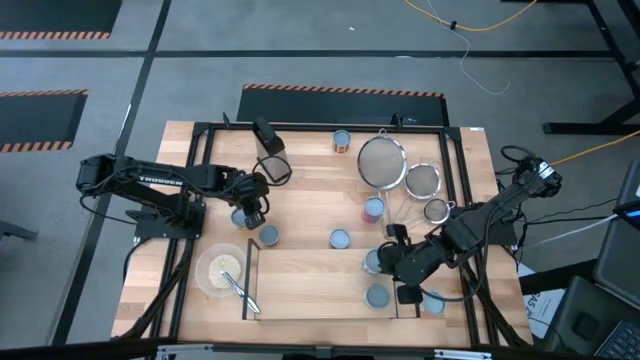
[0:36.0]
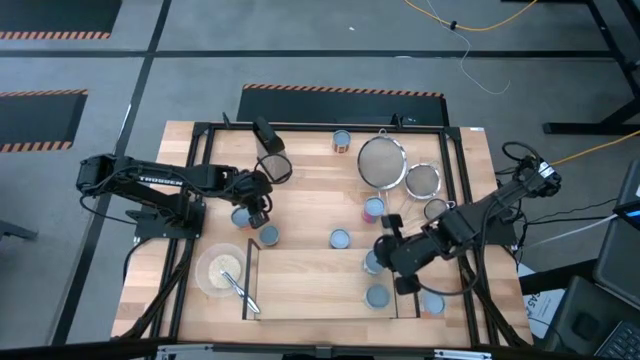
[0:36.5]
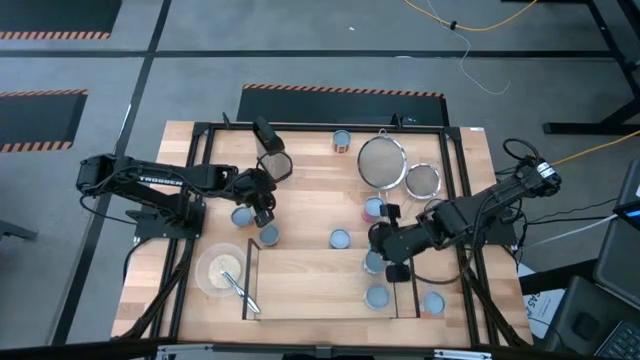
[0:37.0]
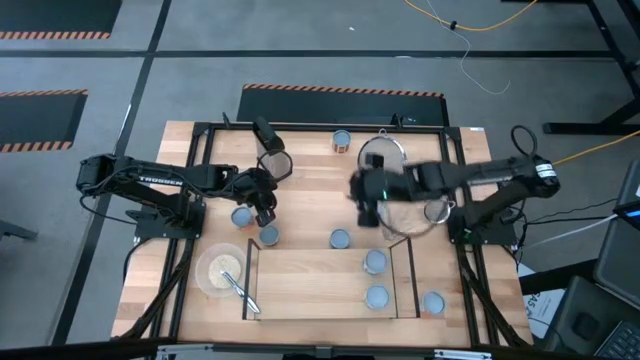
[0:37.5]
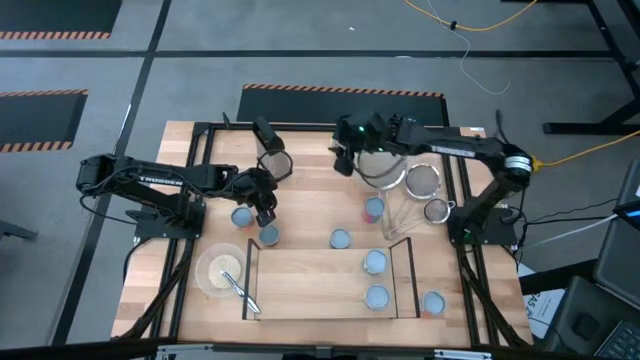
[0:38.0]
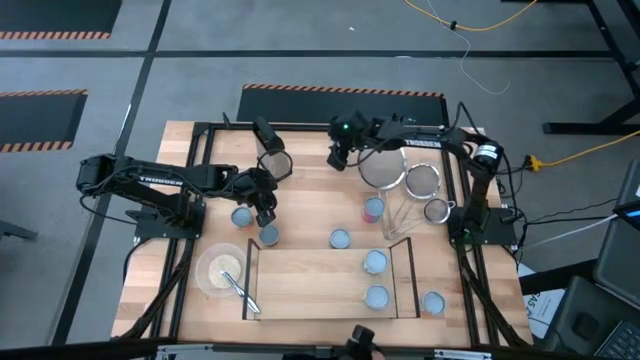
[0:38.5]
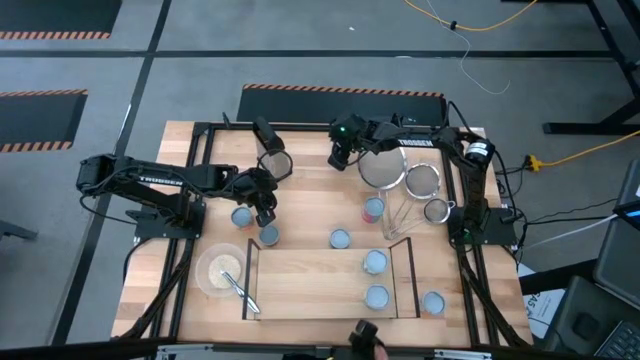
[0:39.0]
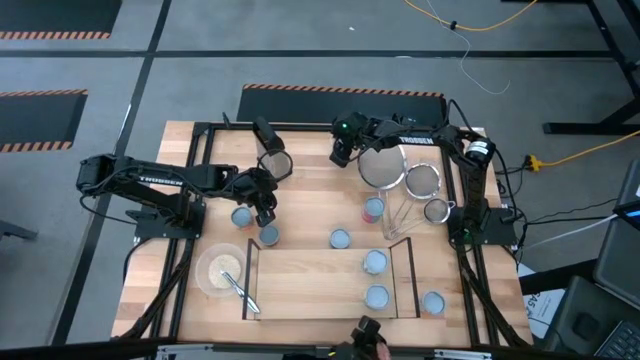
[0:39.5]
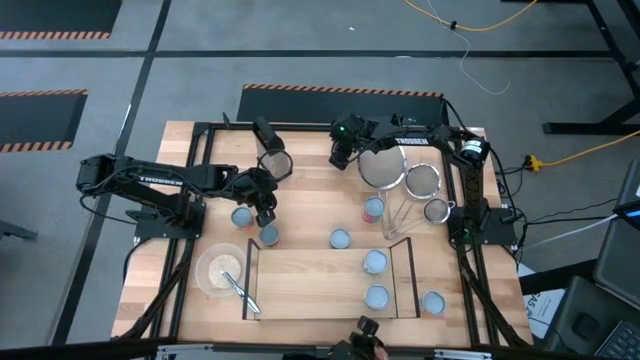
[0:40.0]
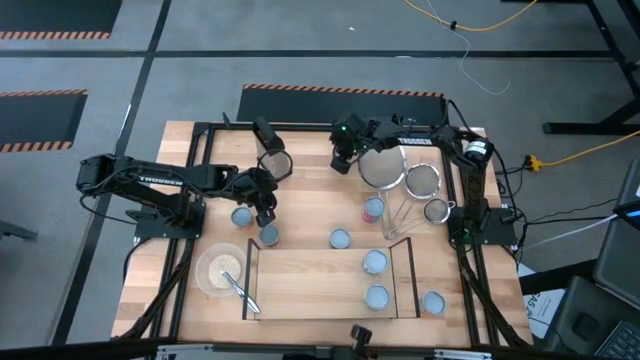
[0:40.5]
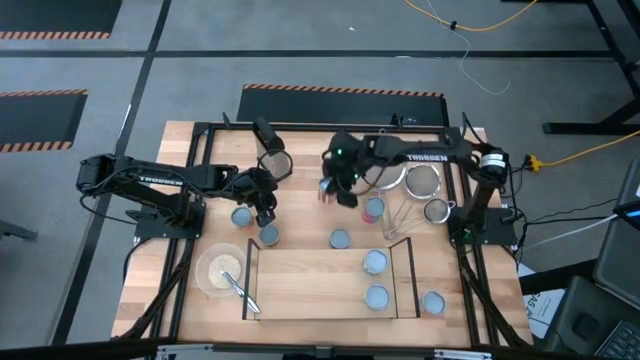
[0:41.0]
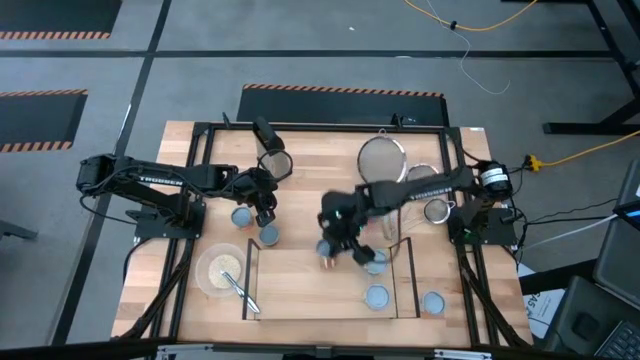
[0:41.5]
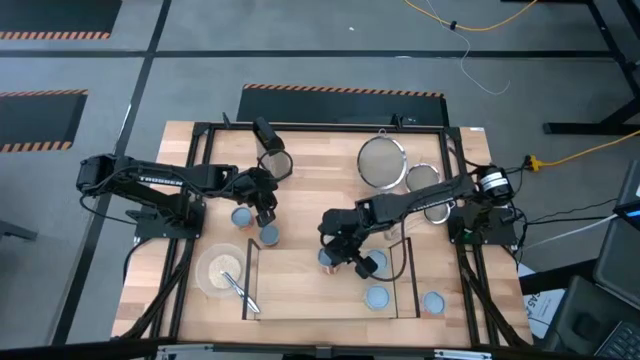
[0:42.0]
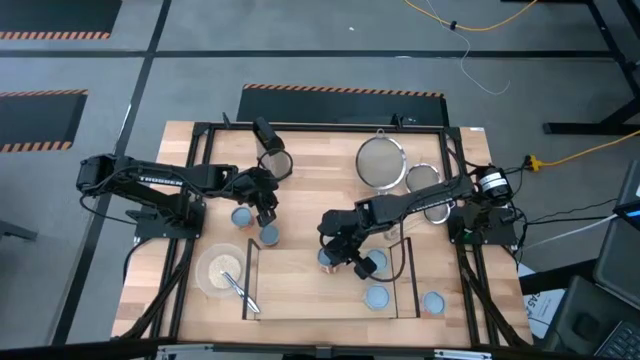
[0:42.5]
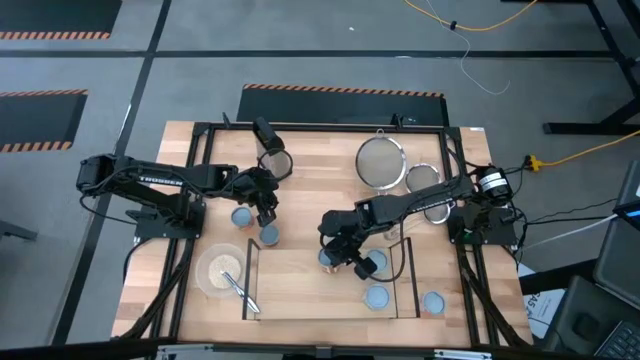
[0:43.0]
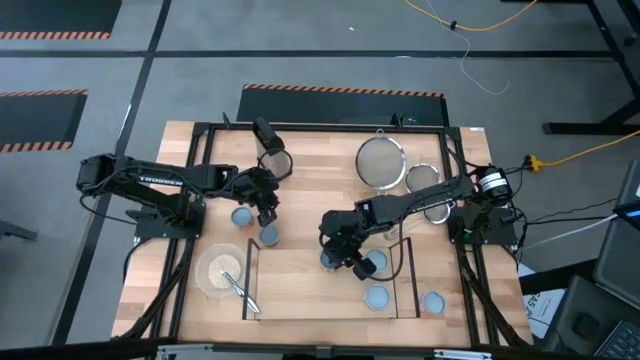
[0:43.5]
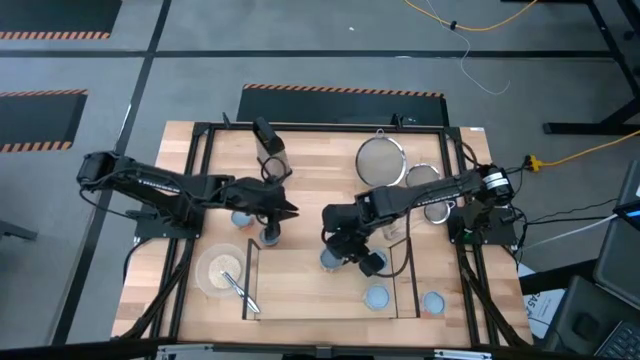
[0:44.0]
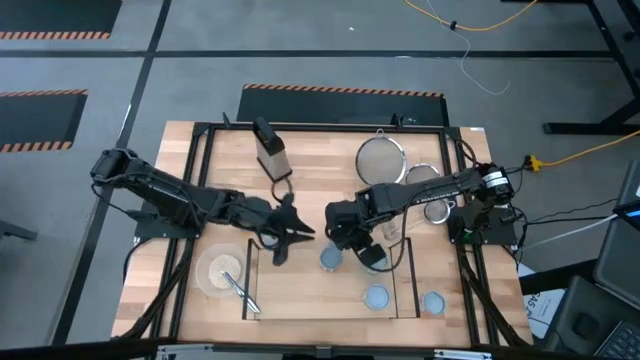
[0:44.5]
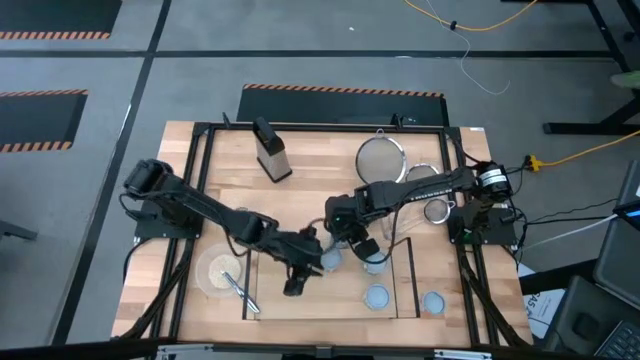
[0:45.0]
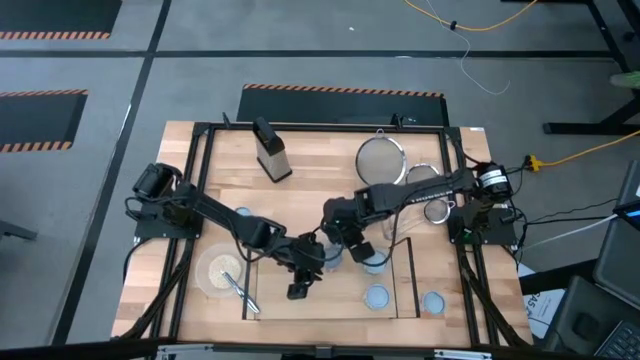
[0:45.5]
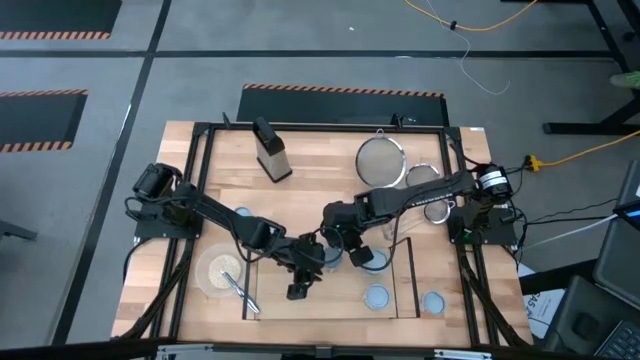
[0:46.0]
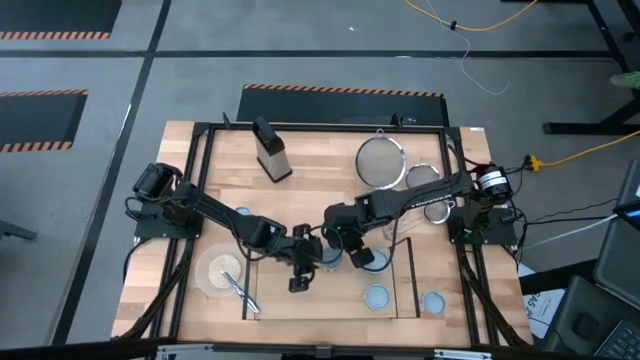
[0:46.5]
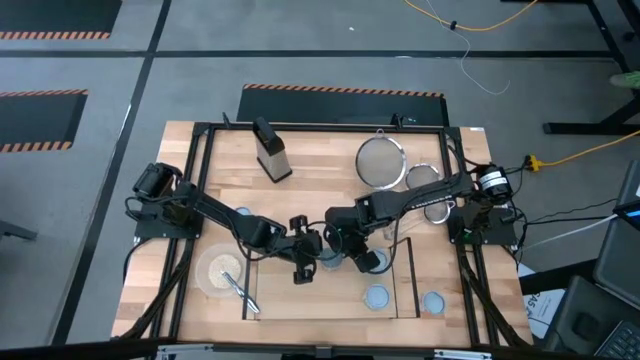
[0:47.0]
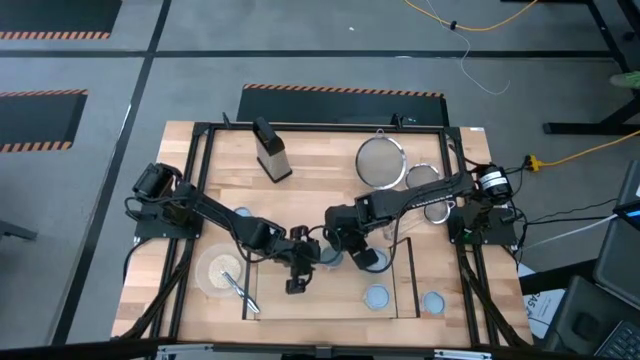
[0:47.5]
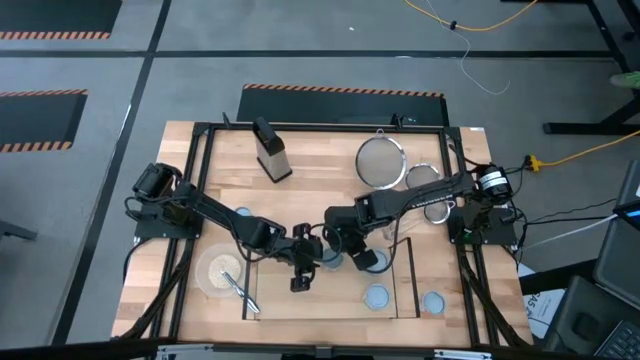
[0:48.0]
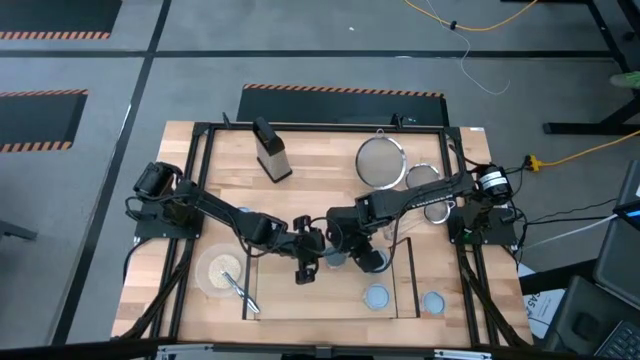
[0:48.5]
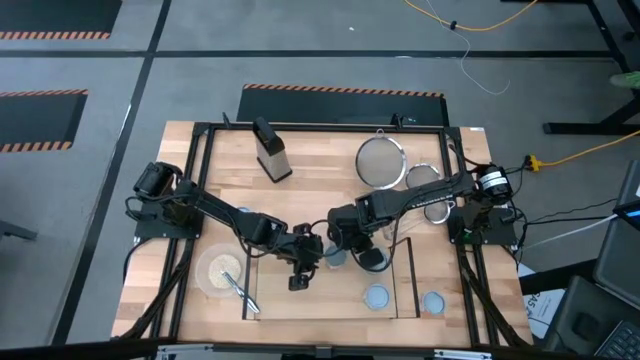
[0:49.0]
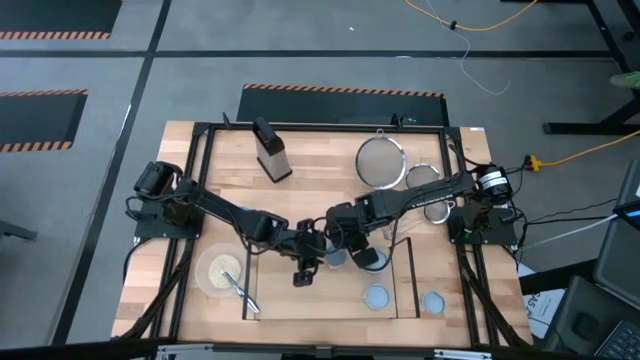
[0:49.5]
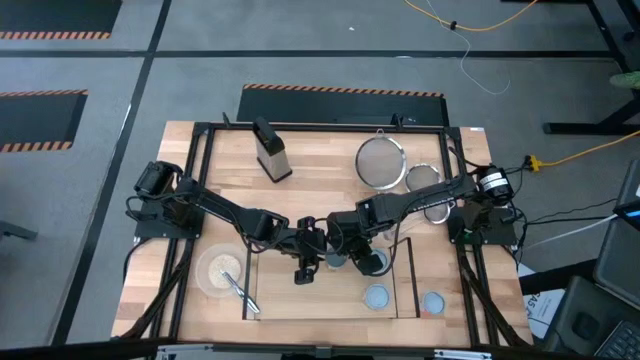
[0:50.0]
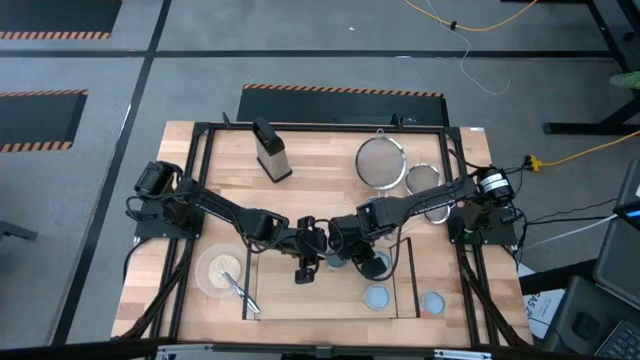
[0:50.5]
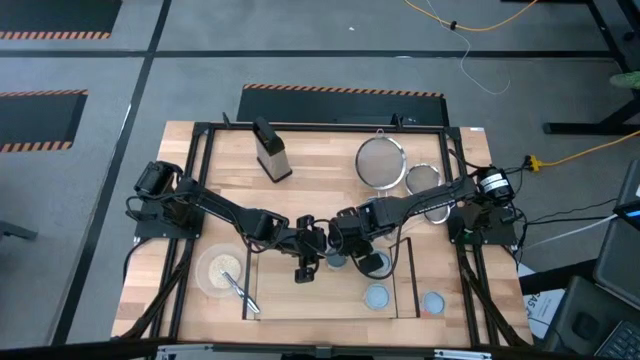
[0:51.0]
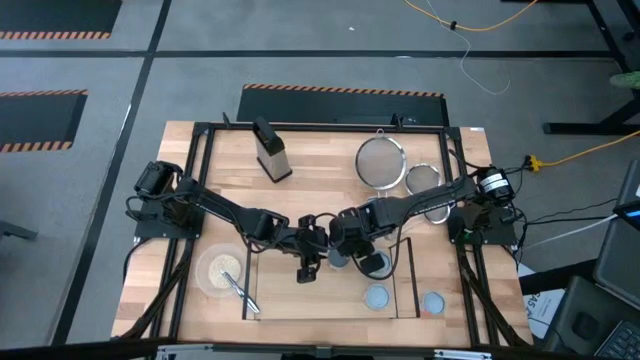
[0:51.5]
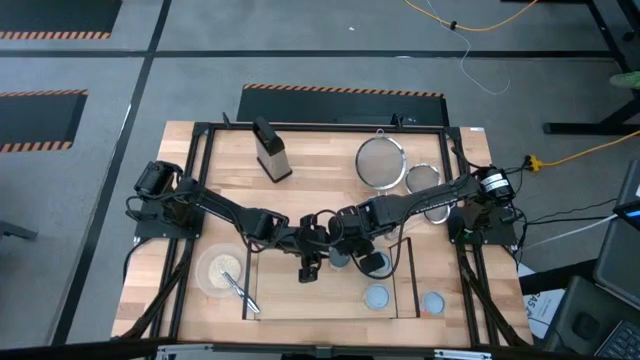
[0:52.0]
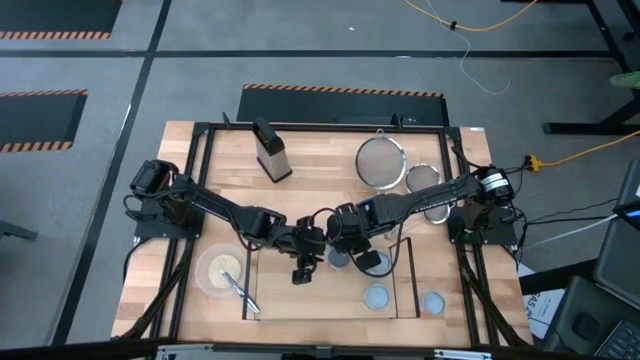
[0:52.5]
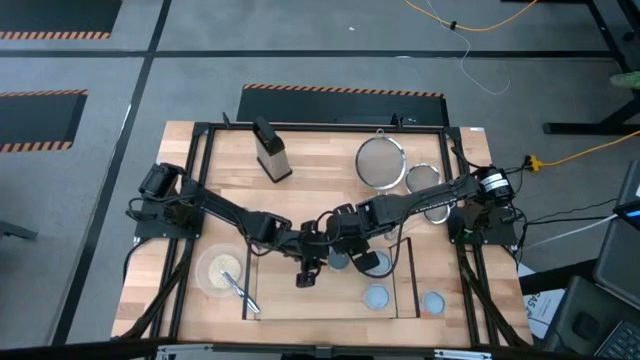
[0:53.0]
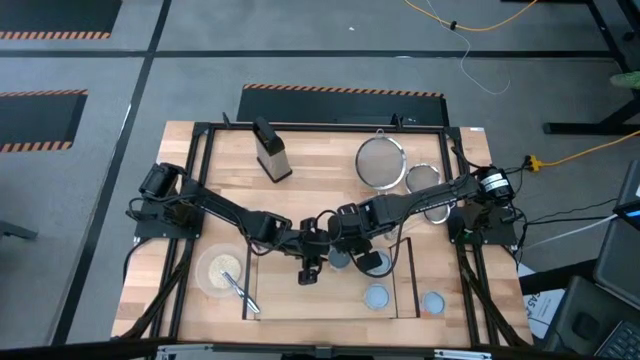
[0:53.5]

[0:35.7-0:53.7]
Task: Pick and place cans onto a shelf
Put the top canned diced tomatoes on the shelf

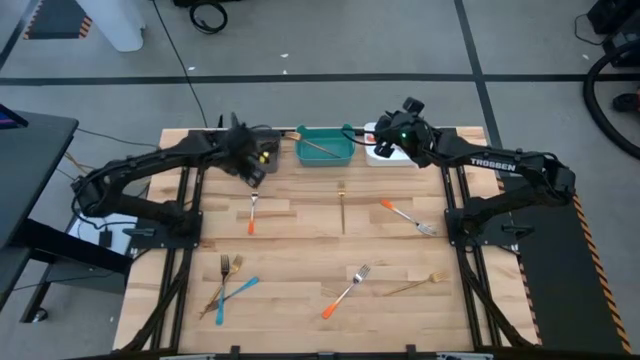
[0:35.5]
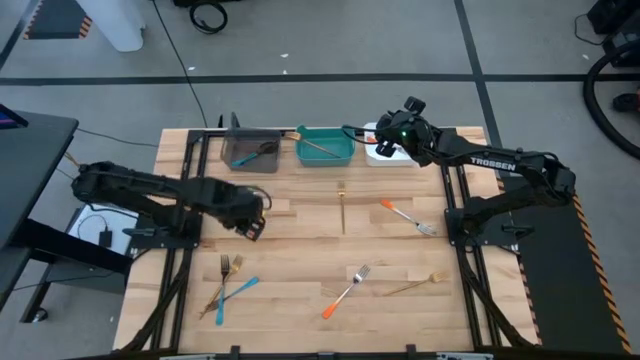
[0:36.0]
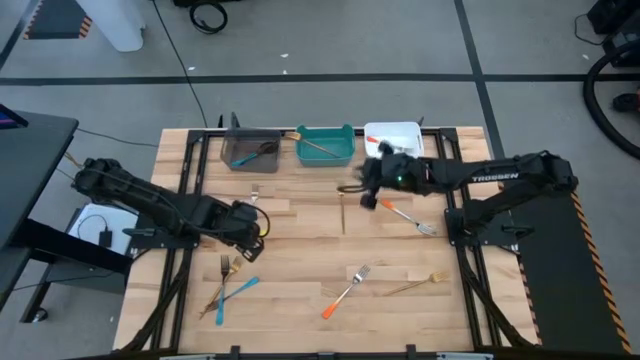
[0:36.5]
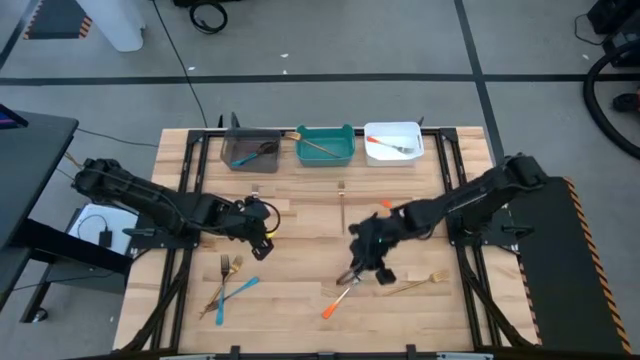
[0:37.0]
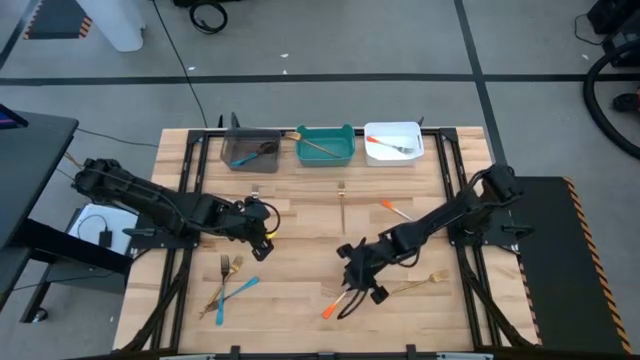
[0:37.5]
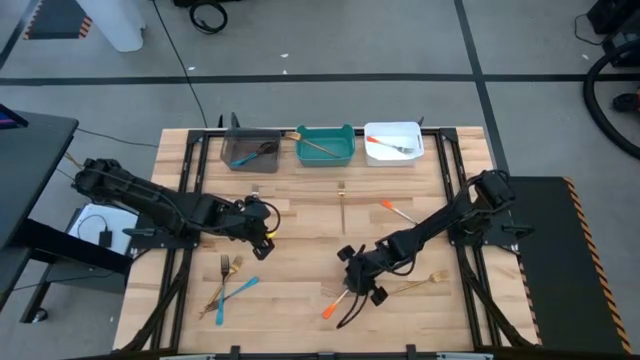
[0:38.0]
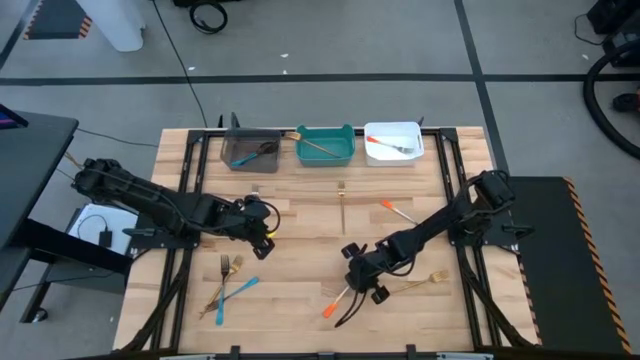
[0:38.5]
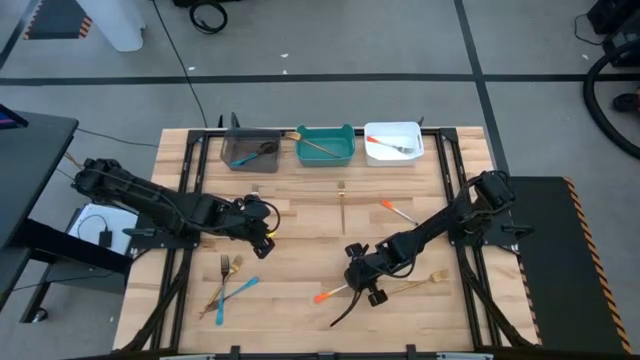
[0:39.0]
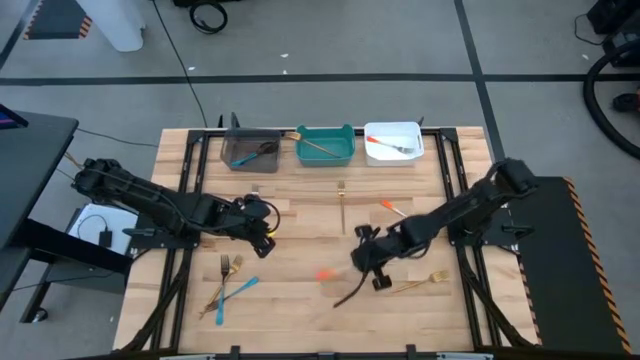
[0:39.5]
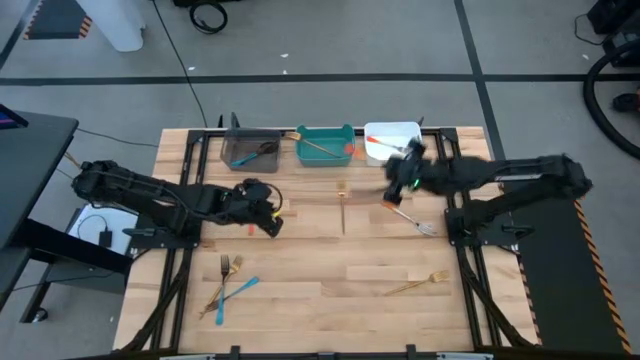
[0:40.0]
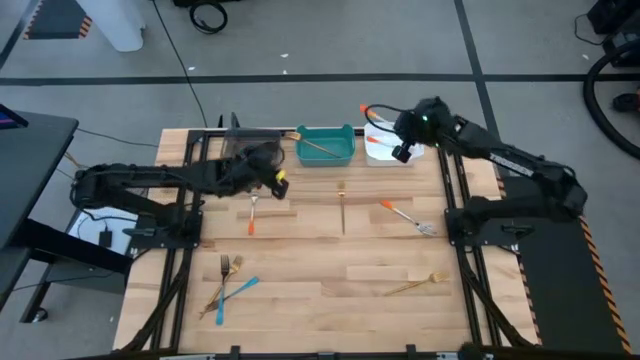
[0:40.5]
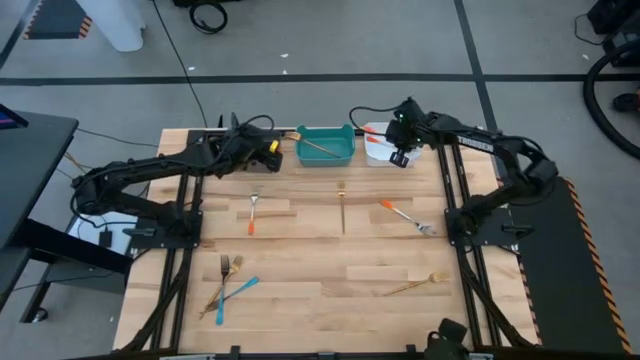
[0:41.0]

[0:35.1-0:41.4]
Task: Sort silverware by color (type)
Put the orange fork into the white bin
